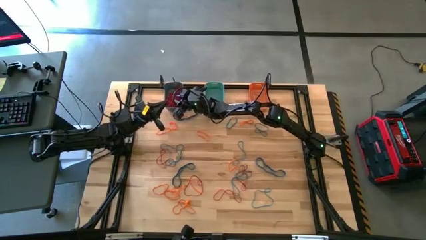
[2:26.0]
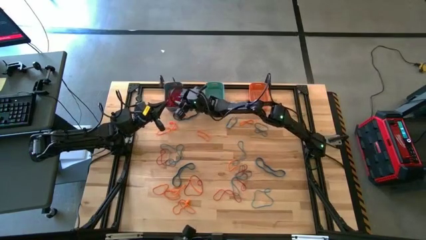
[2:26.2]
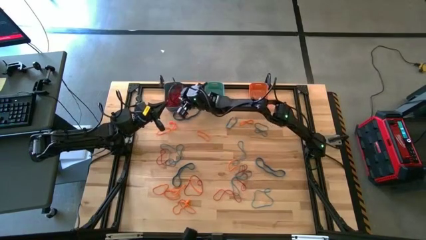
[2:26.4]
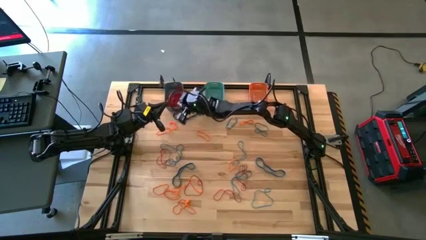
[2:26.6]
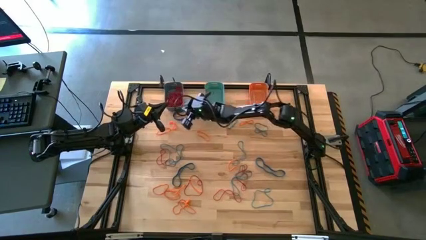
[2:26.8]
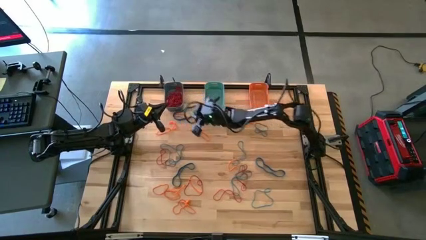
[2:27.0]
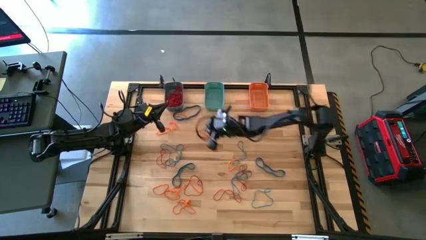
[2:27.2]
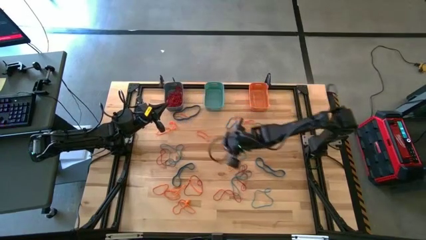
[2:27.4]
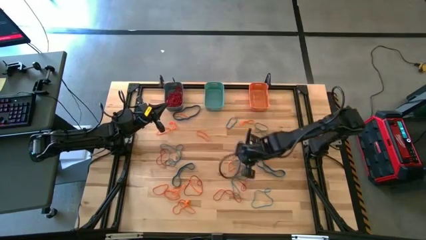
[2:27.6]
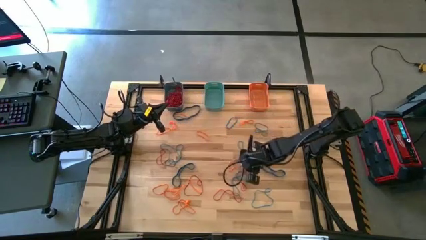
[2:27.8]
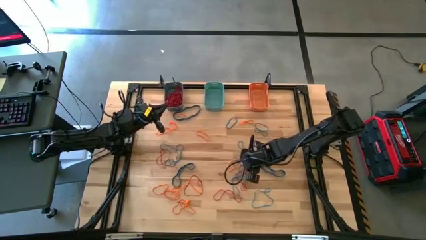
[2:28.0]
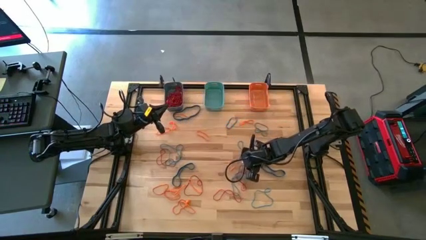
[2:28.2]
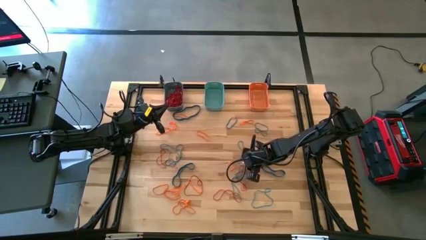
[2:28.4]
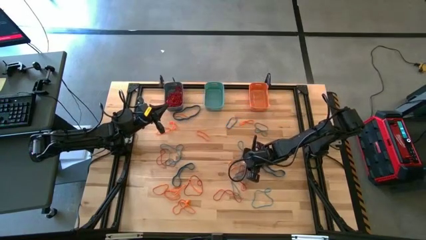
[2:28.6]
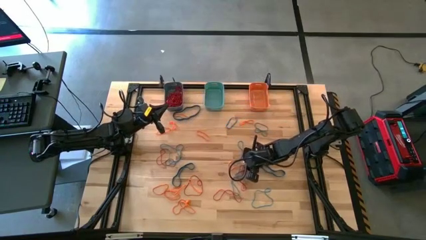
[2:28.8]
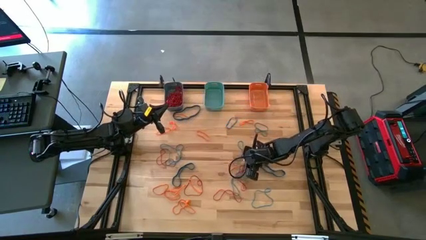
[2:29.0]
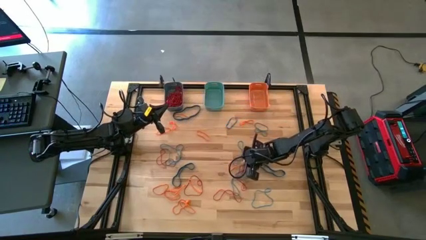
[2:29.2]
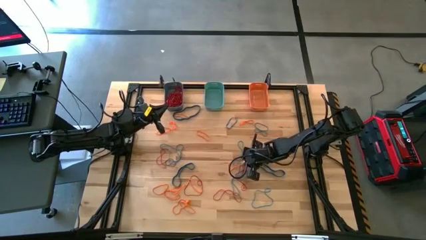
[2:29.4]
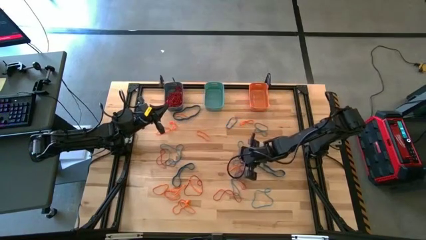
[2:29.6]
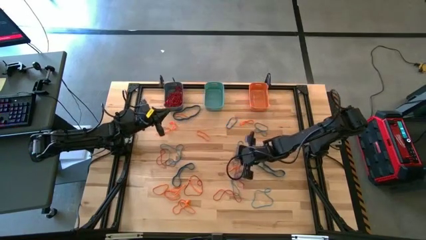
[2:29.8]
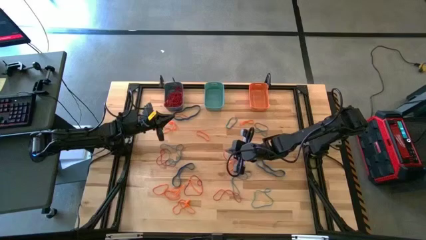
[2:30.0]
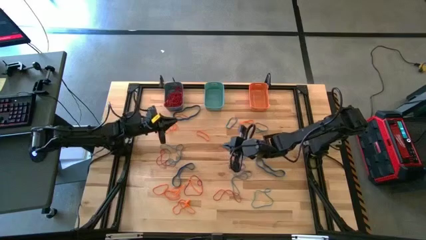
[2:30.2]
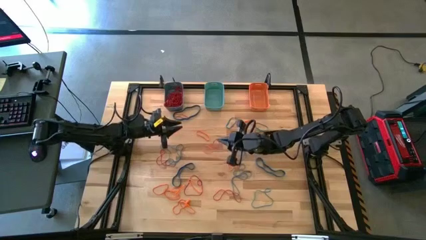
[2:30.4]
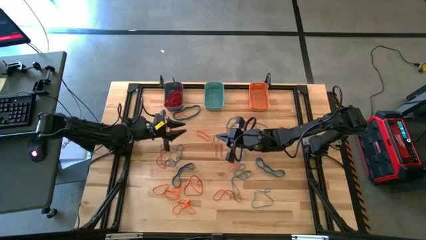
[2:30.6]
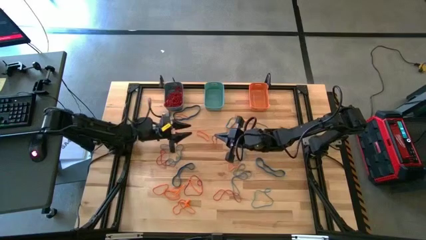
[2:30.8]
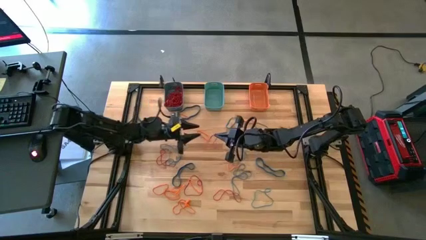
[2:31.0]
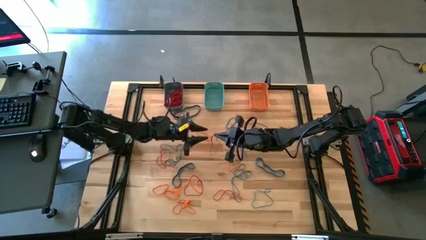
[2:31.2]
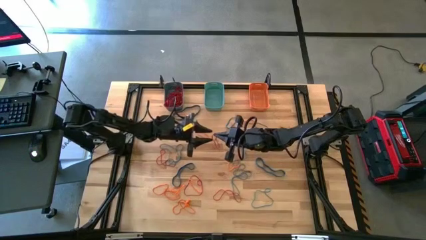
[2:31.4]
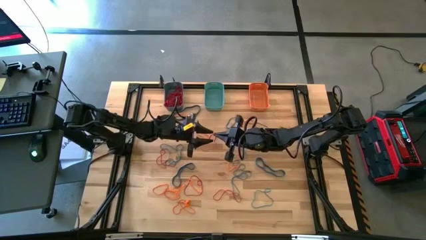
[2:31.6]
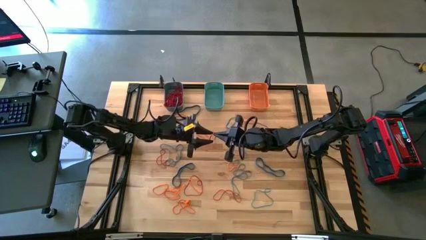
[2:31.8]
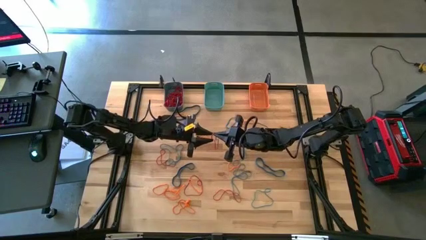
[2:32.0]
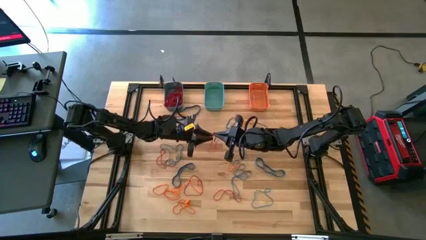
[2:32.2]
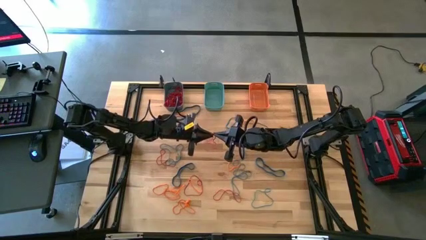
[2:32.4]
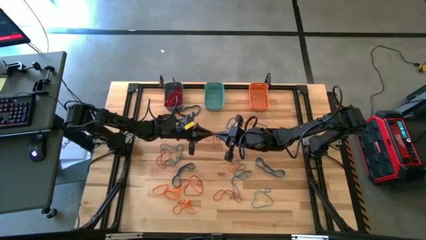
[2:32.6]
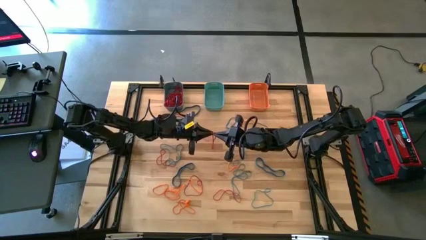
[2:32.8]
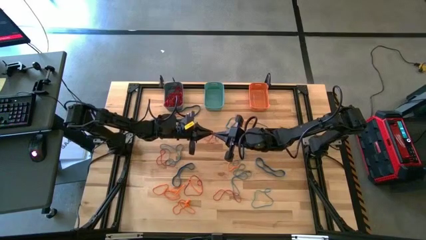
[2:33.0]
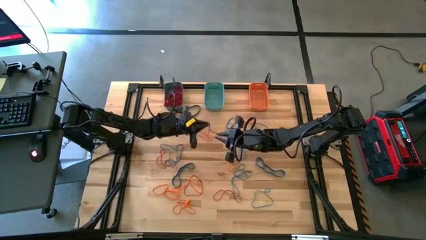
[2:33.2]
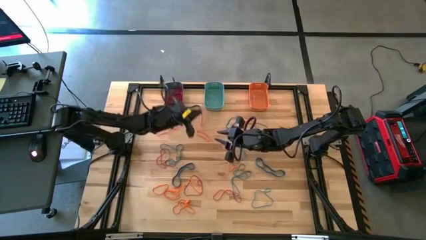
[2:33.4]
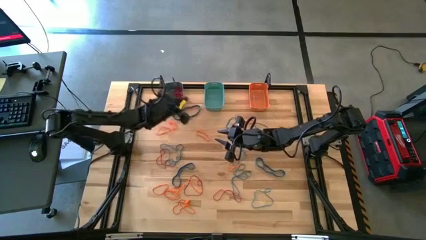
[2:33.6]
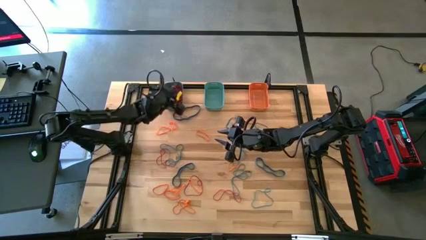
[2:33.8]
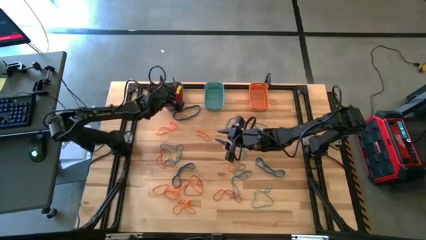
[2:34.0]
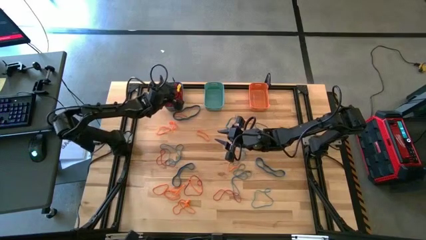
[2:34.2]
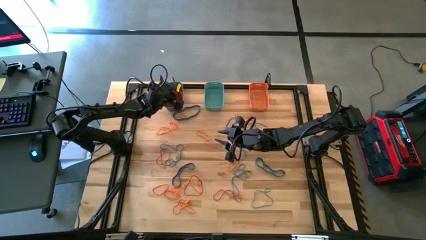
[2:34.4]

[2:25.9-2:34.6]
Task: Sort rubber bands into baskets
Put the red rubber band into the blue bin

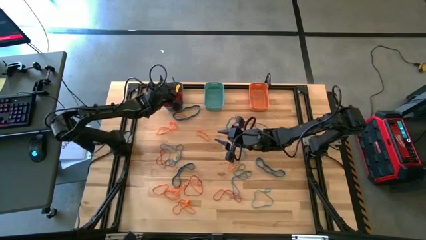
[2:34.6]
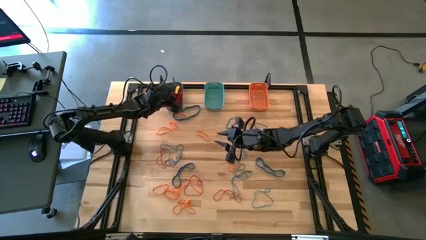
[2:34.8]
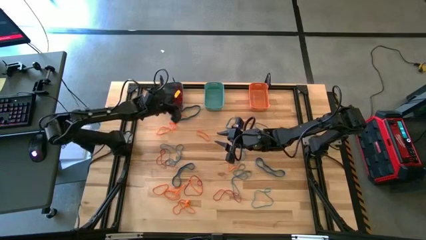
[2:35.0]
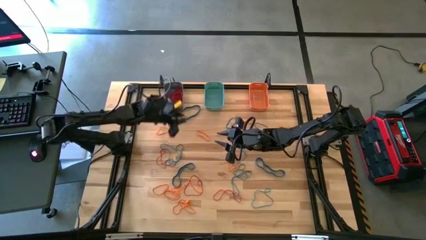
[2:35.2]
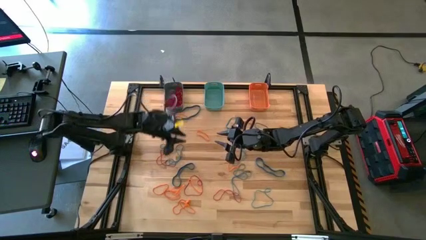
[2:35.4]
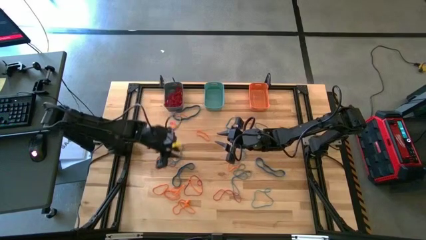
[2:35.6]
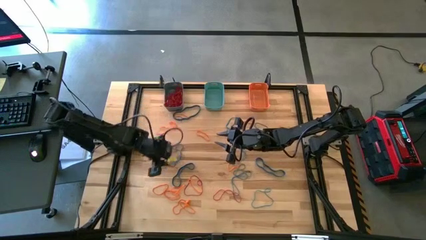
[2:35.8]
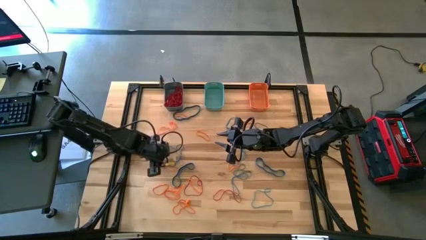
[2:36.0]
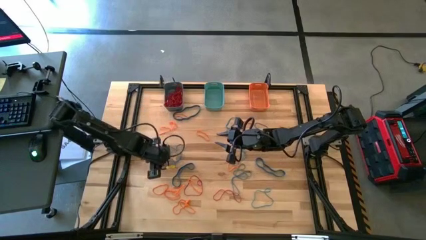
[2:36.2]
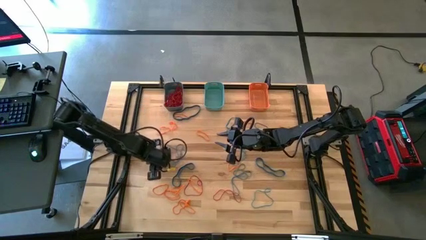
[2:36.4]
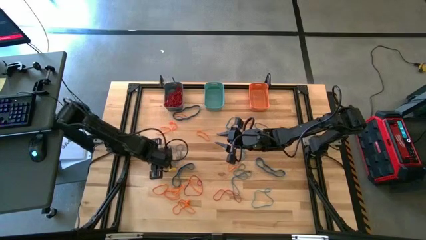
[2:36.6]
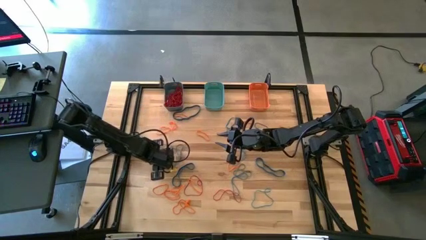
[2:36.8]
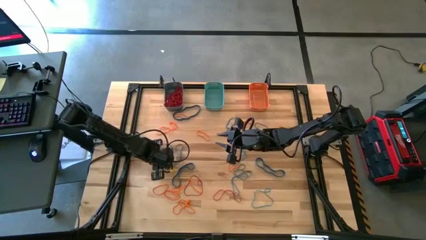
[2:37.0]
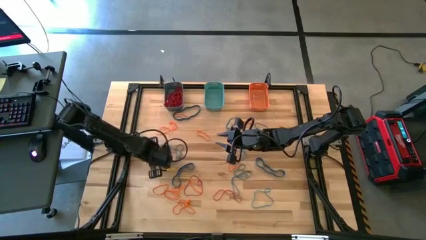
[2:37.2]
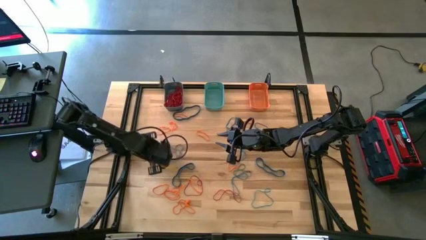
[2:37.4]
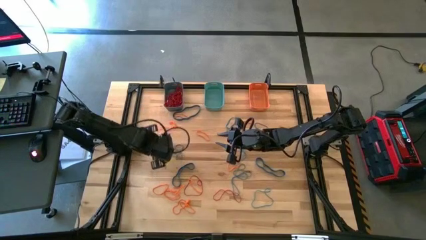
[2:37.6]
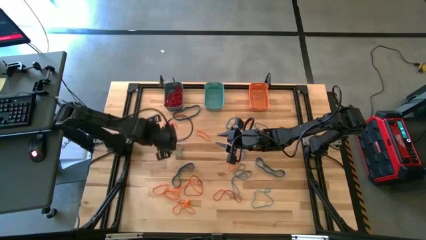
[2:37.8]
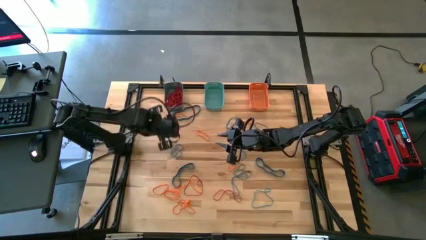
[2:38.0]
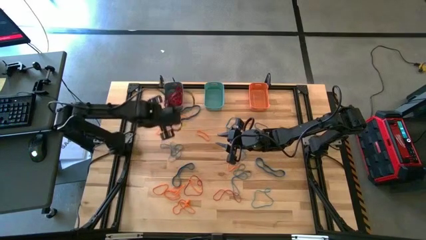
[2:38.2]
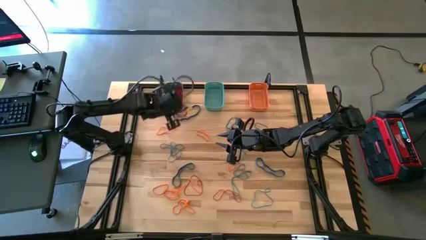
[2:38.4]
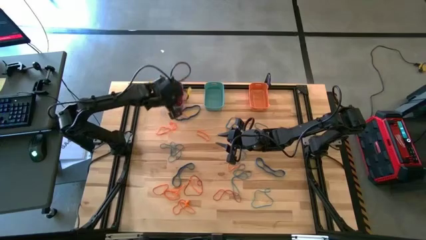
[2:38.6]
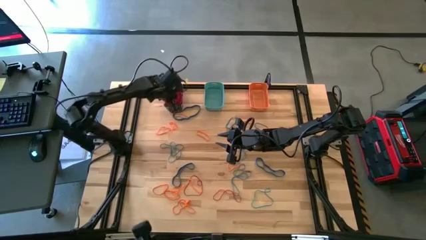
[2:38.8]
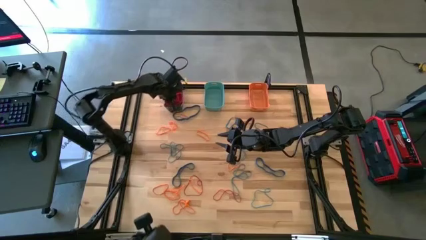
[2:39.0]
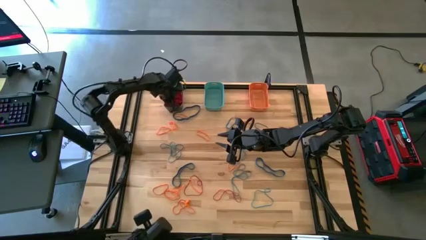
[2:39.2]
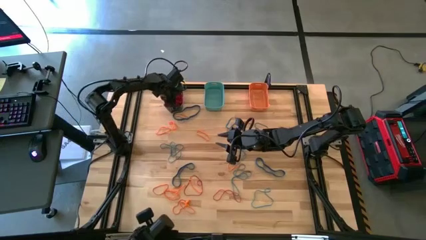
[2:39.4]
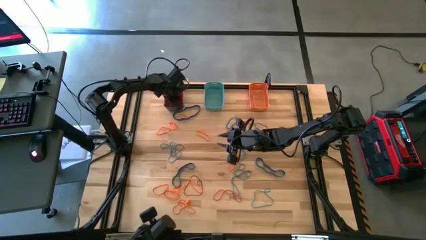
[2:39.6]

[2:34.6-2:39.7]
Put the red rubber band into the blue bin

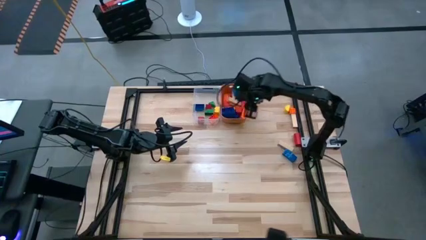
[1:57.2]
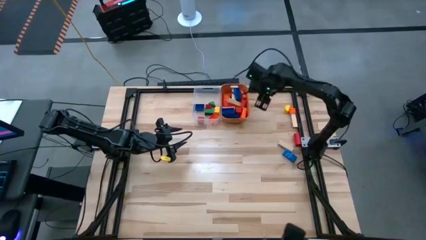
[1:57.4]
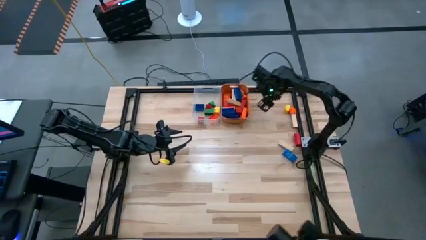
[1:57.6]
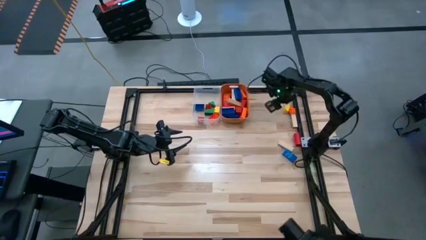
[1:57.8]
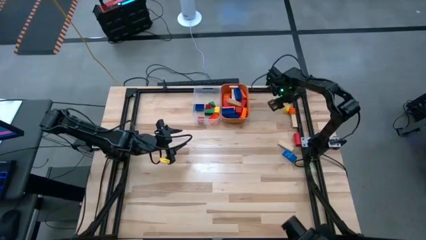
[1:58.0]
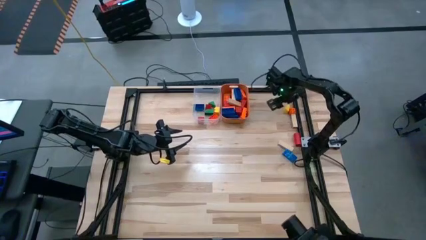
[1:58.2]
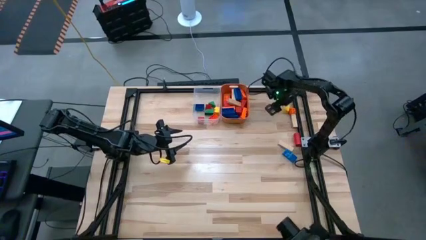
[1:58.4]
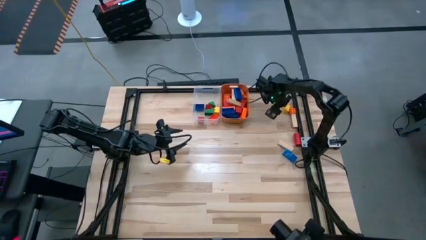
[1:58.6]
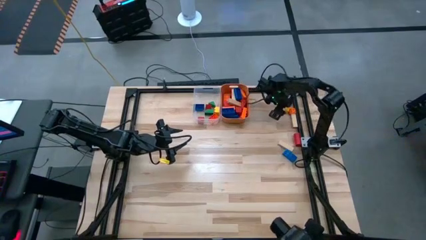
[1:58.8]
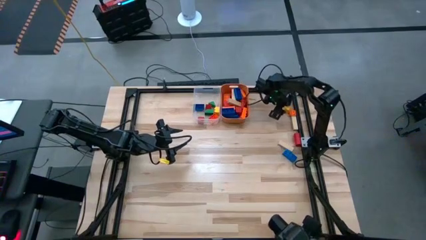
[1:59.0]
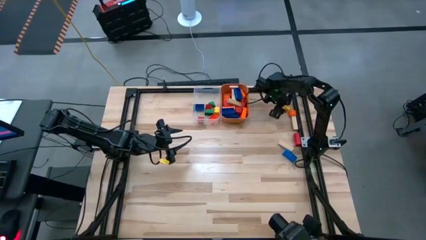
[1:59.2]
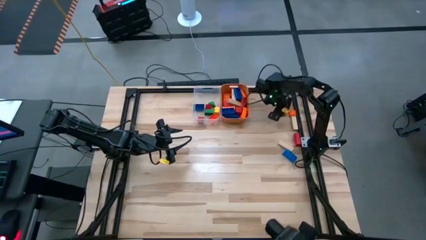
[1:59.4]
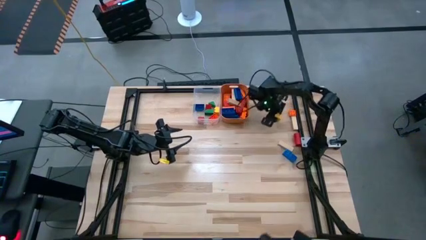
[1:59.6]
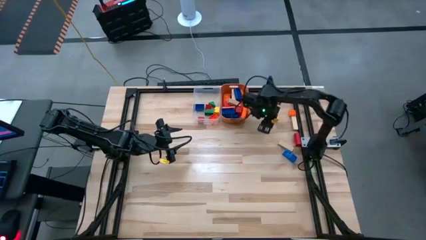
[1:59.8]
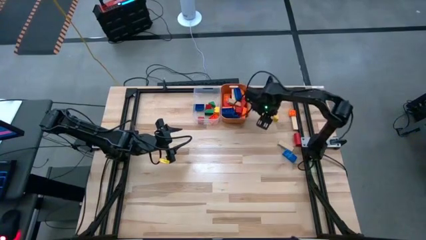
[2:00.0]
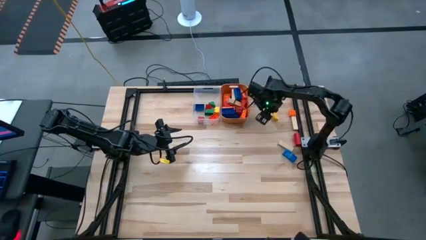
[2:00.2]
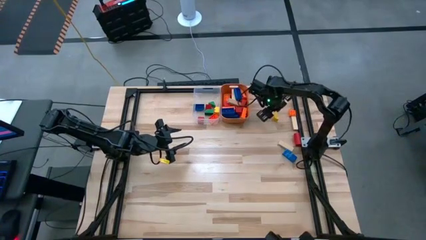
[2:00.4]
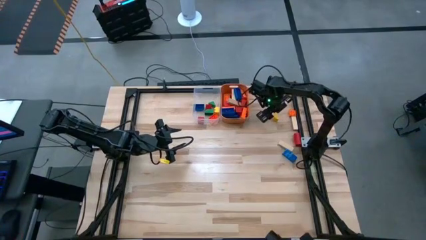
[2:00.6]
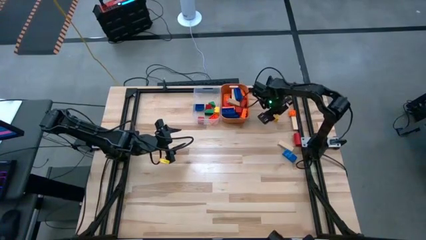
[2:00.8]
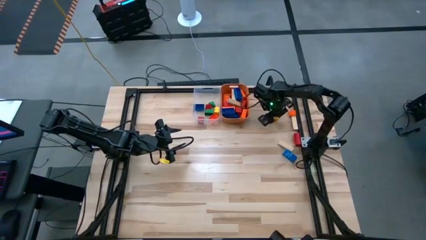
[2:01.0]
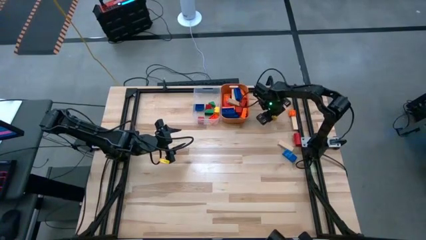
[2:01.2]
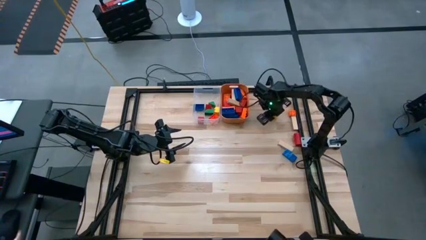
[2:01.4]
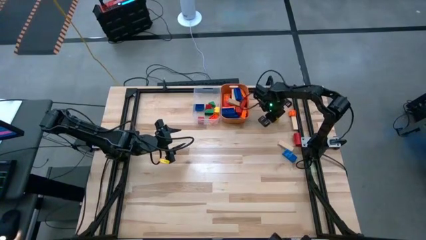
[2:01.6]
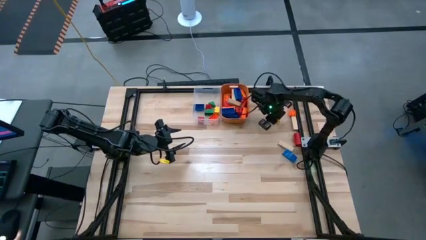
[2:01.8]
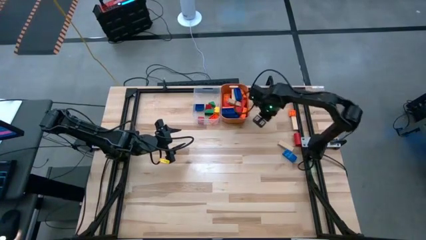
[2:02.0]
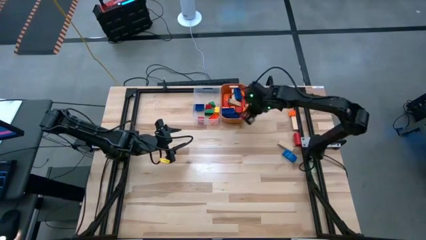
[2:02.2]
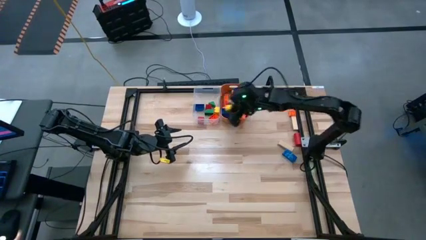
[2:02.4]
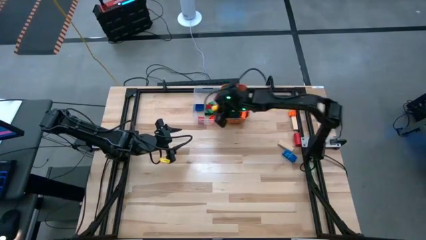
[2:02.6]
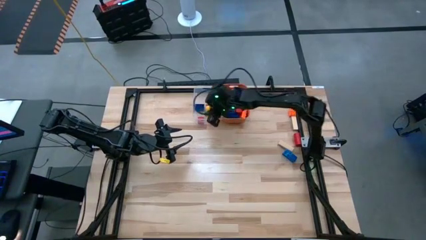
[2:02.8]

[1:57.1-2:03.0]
Task: Sort blocks by size
Put the yellow half-circle block into the clear bin
